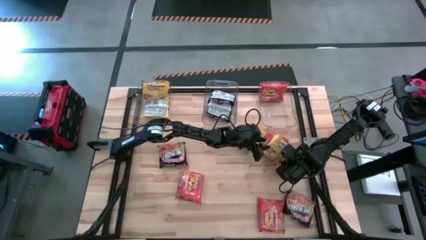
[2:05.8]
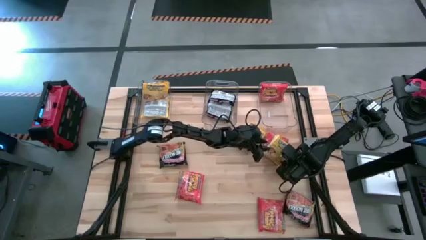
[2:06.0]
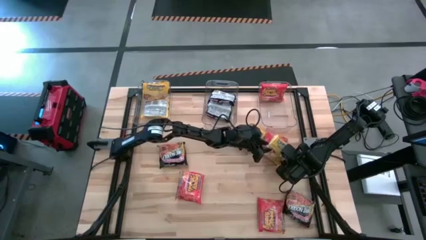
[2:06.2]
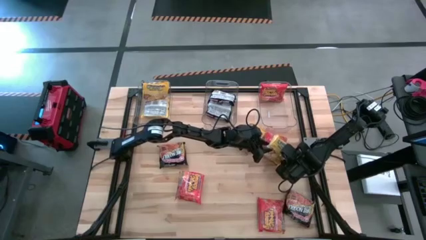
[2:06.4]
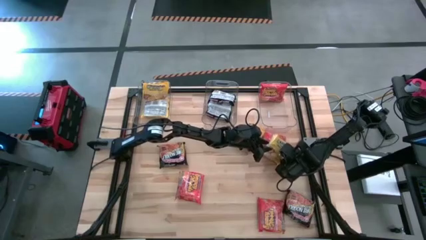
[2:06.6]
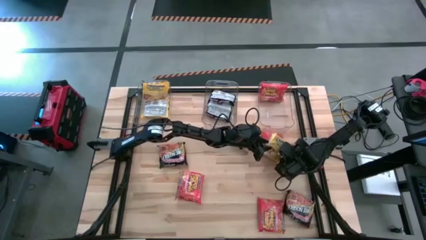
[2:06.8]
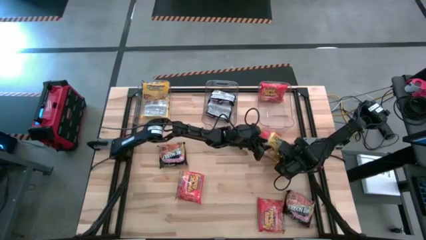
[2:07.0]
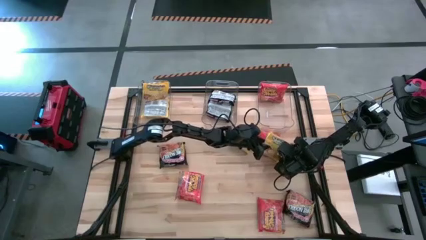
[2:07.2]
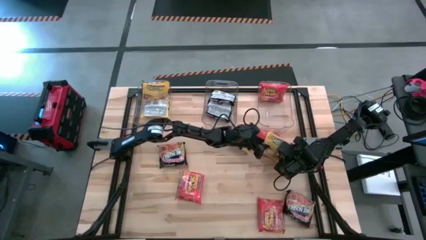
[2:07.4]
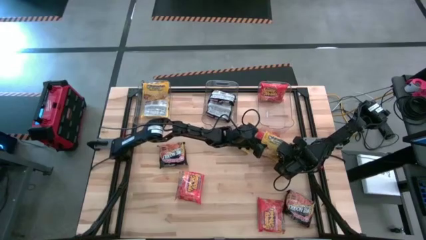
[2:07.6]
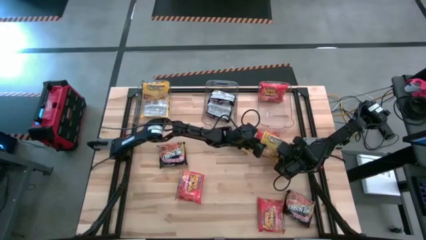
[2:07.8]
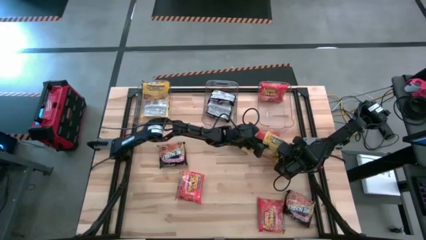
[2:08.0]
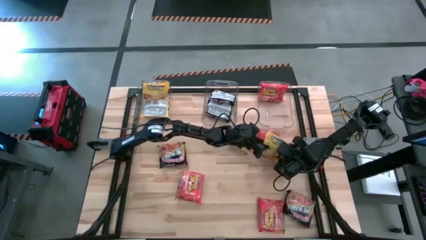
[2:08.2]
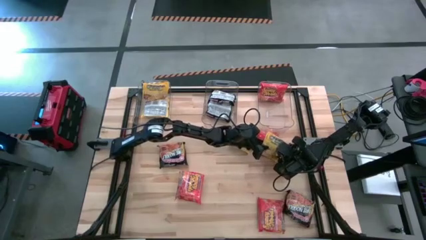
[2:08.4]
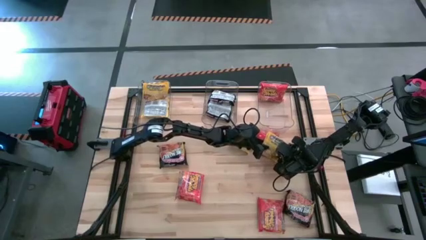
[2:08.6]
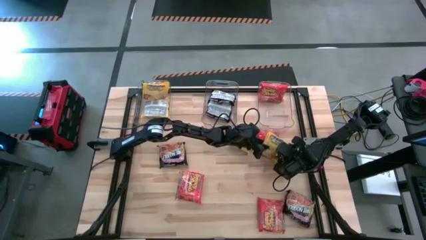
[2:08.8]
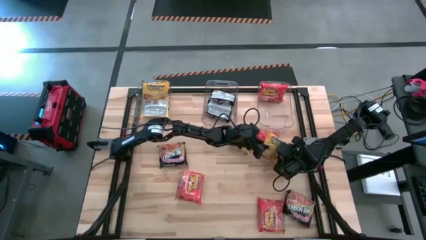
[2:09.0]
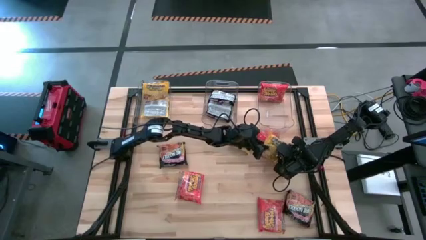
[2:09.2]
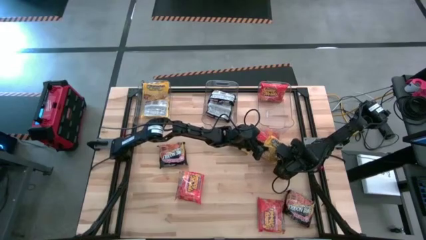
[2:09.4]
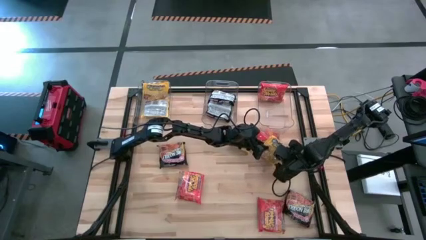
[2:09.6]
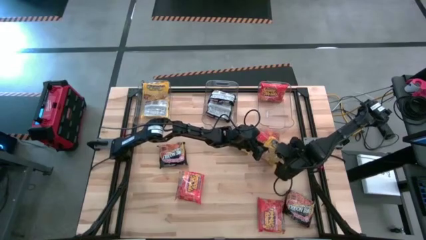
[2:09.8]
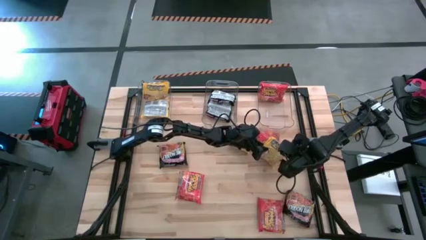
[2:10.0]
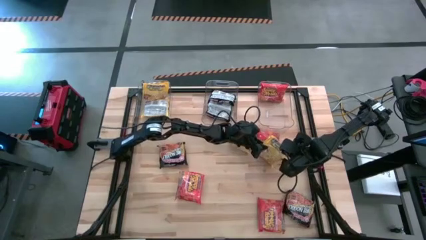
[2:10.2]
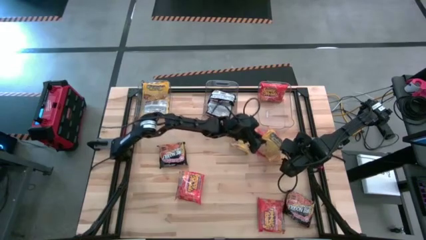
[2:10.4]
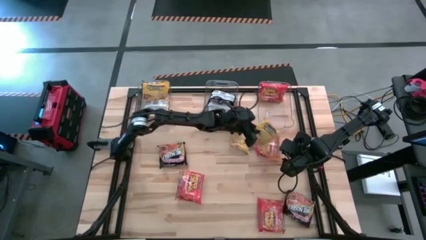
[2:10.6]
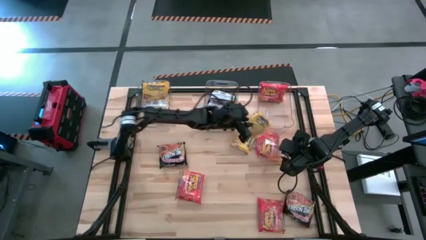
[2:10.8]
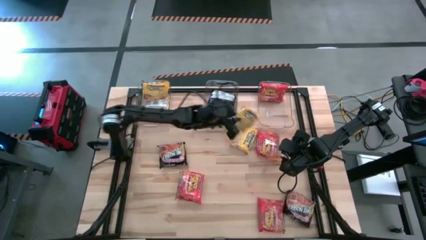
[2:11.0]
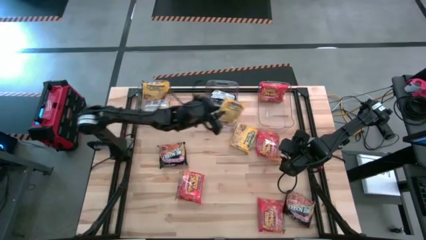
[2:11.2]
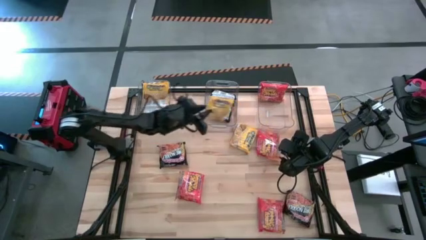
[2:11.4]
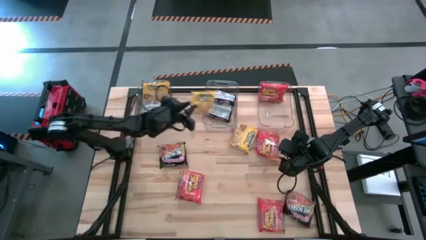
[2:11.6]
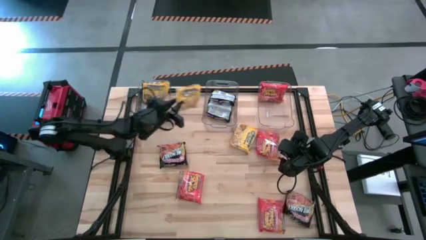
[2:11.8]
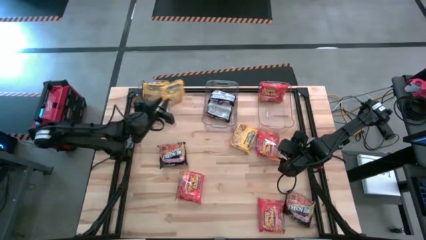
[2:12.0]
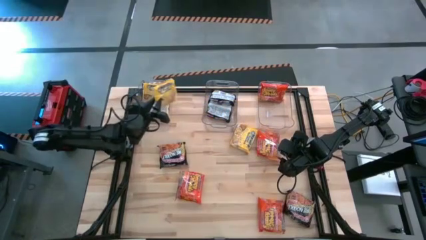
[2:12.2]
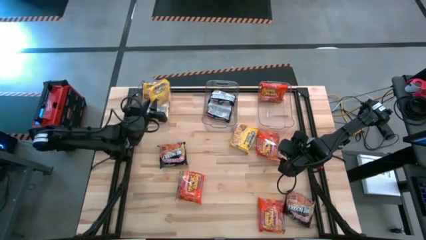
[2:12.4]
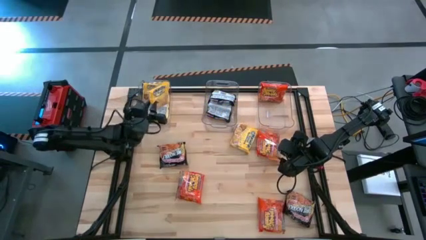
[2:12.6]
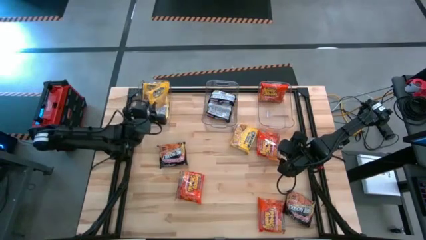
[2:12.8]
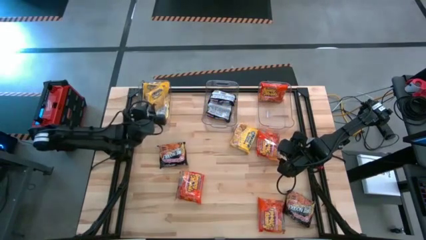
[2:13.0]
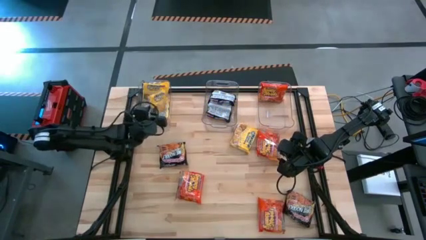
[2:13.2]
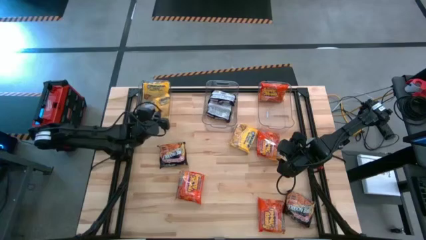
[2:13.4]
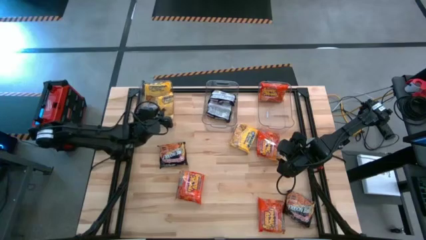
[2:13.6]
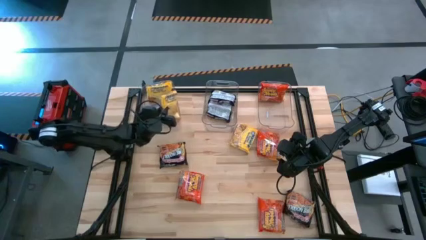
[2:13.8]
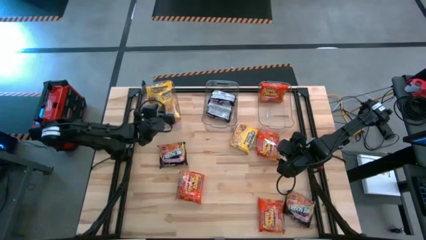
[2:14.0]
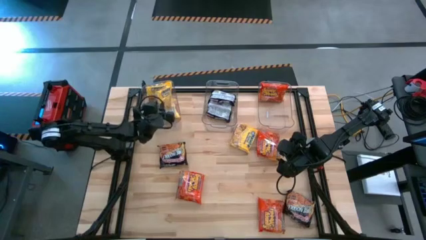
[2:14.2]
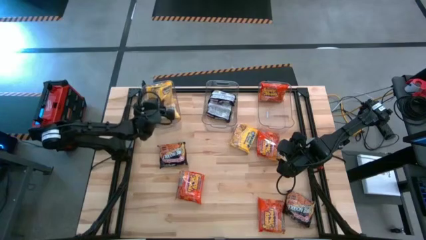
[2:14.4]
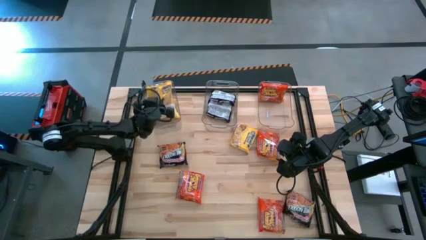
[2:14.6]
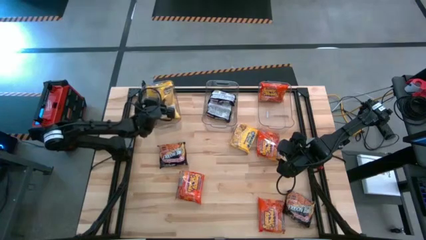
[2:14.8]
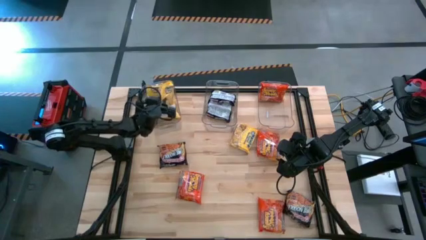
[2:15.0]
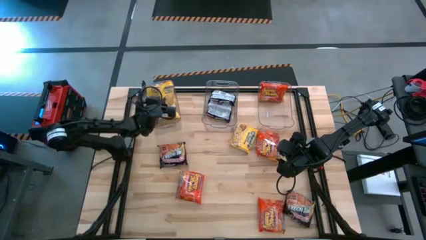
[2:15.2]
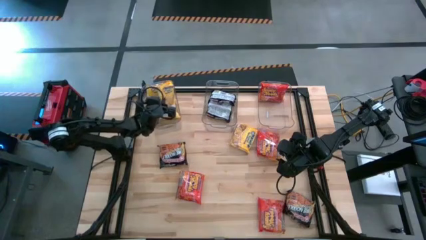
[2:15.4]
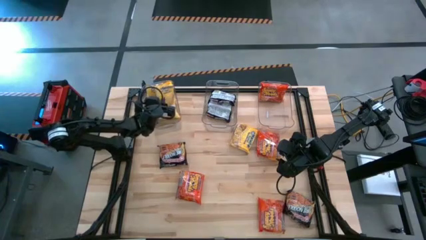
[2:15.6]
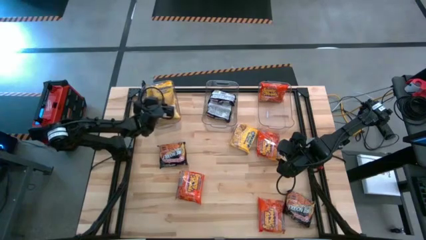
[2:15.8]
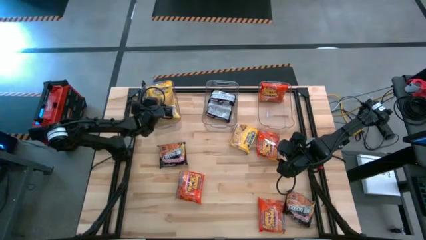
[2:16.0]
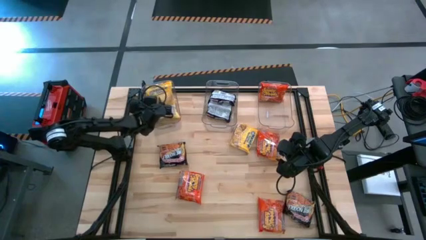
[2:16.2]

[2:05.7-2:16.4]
Task: Sort Maruchan noodles
Put the yellow noodle pack into the left transparent bin

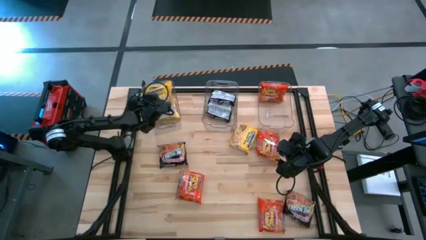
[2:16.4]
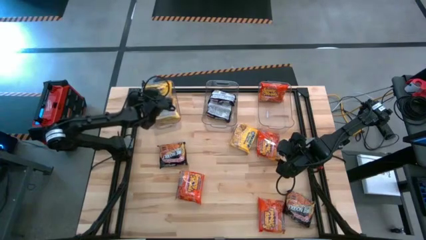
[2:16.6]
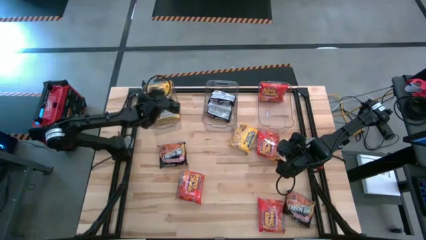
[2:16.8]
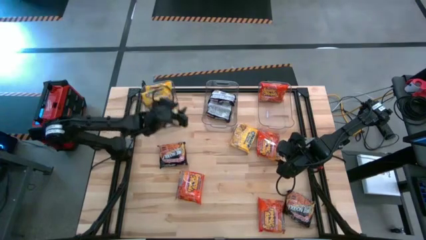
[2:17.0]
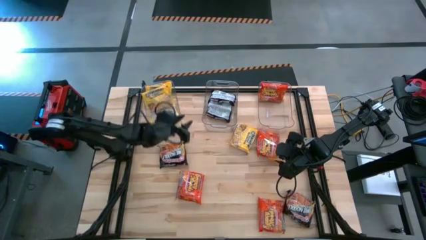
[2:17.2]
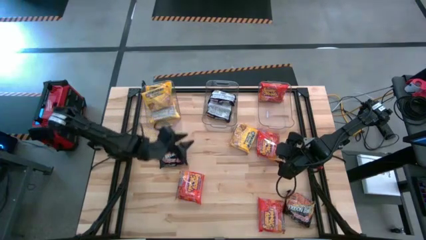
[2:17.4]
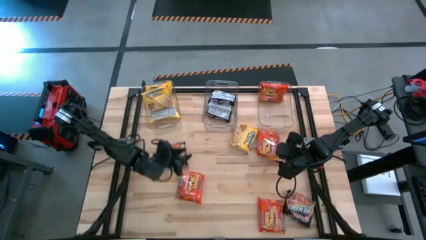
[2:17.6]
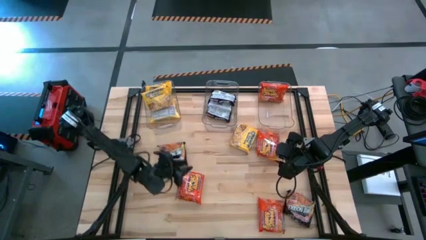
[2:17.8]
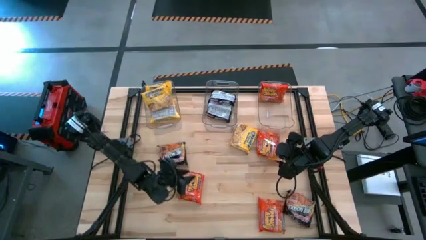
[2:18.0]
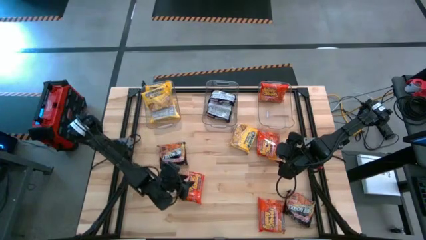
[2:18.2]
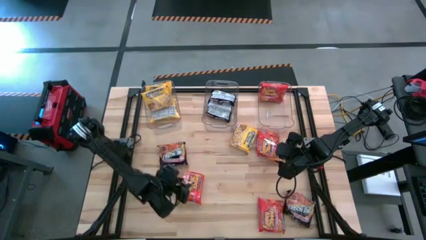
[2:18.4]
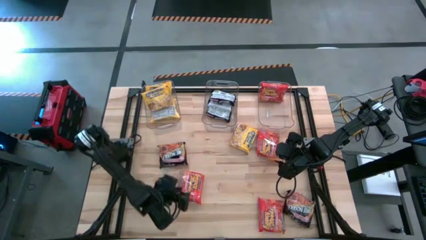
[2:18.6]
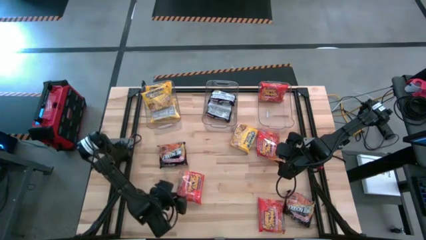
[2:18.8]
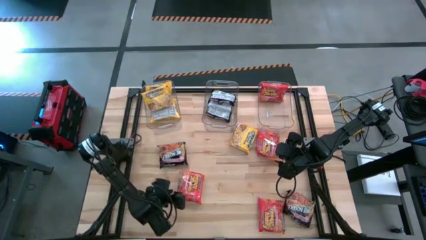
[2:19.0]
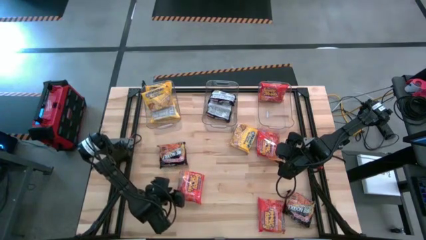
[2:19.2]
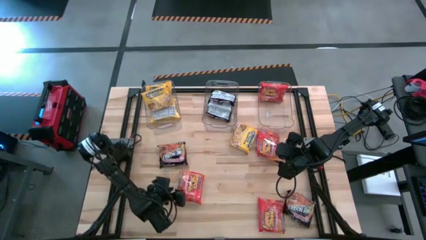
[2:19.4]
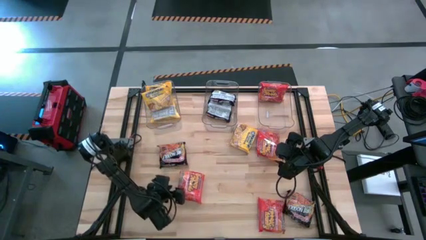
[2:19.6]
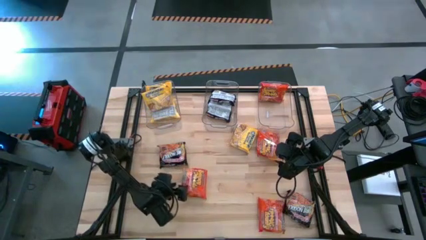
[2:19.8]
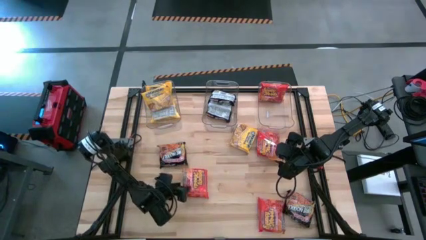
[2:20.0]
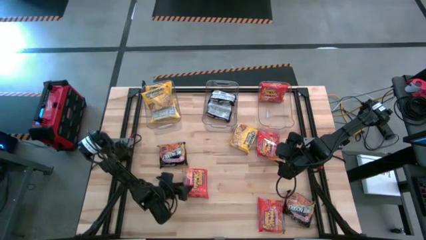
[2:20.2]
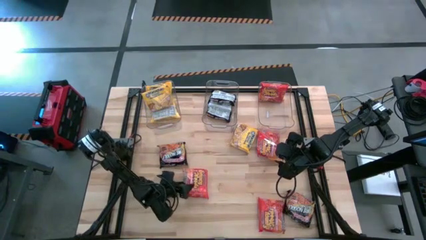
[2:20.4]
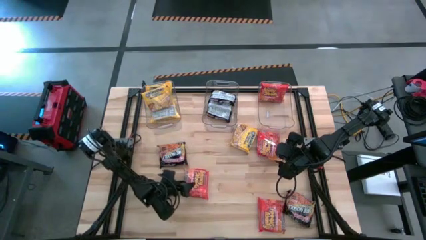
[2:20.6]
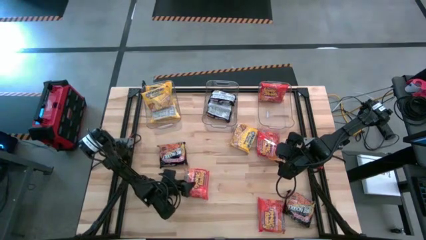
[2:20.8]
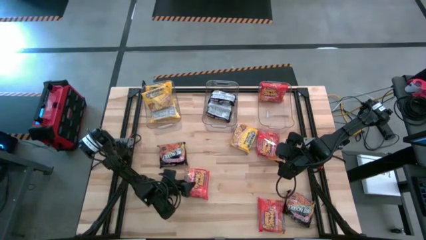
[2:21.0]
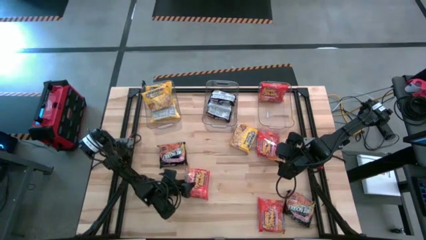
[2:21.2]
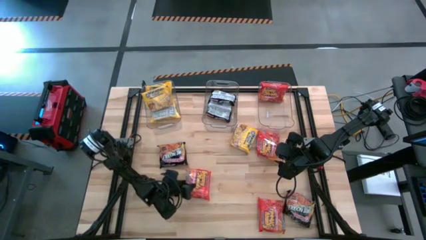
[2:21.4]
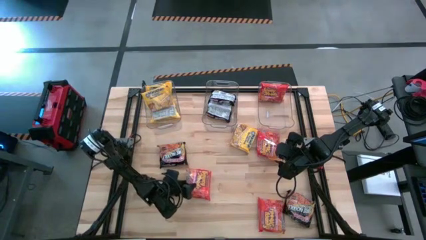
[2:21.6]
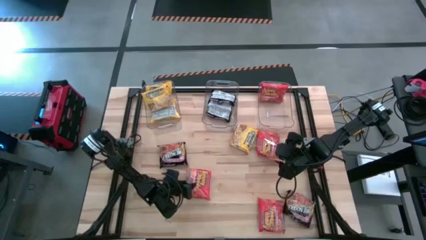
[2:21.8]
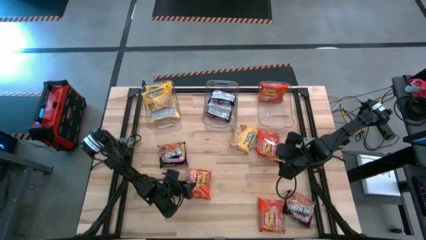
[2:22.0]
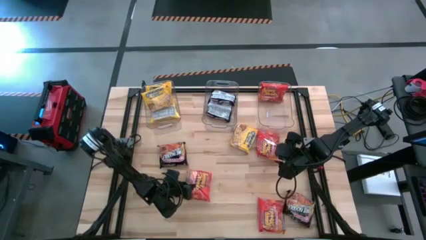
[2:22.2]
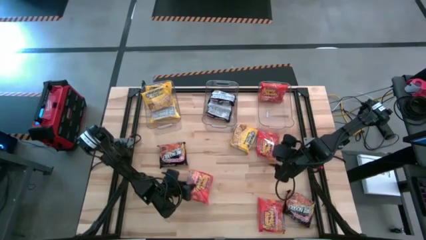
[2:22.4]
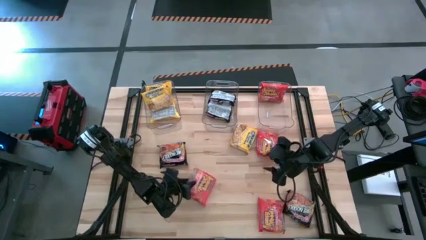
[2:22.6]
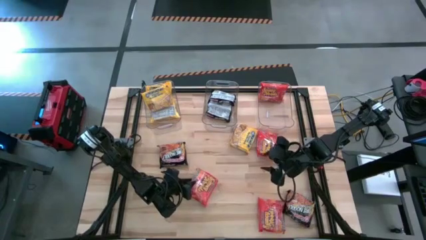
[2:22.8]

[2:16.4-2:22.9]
Put the orange noodle pack into the right transparent bin
